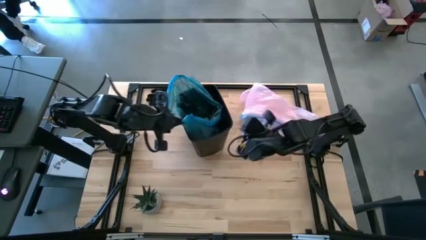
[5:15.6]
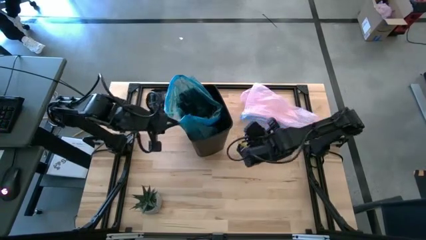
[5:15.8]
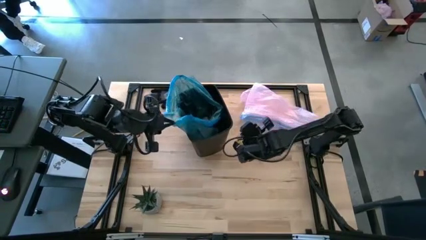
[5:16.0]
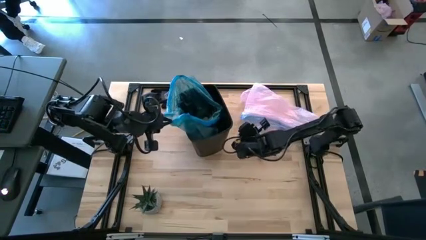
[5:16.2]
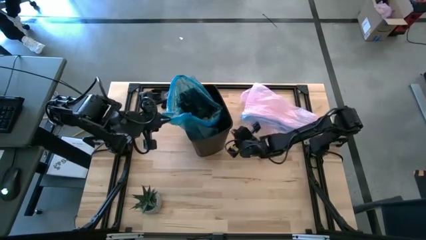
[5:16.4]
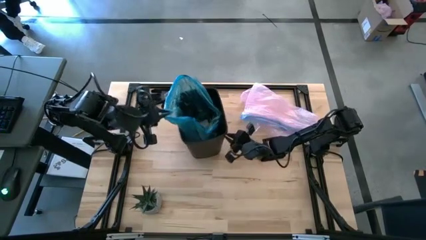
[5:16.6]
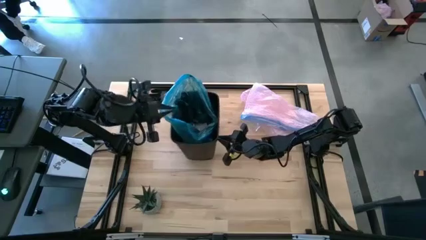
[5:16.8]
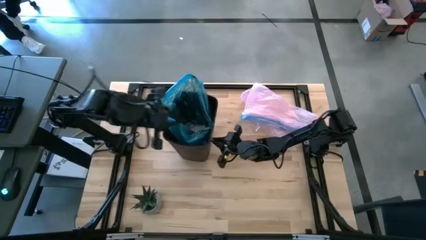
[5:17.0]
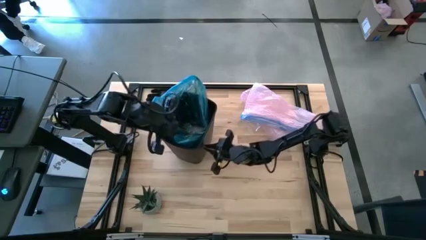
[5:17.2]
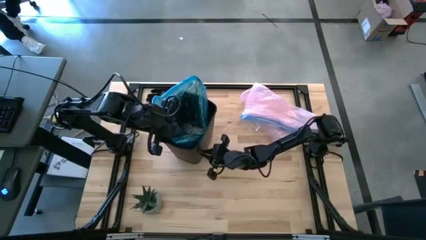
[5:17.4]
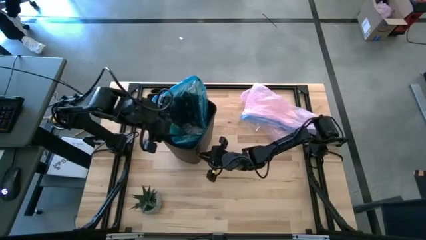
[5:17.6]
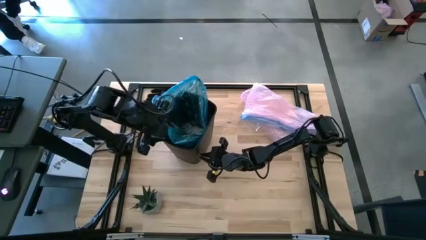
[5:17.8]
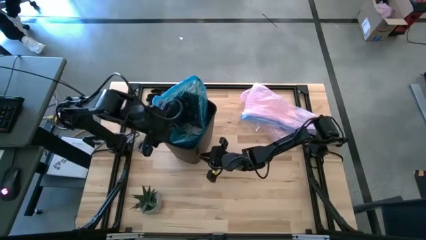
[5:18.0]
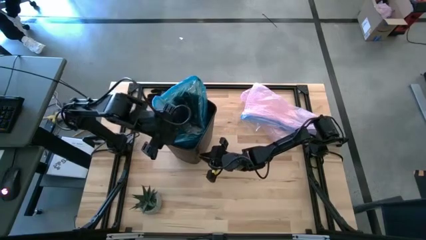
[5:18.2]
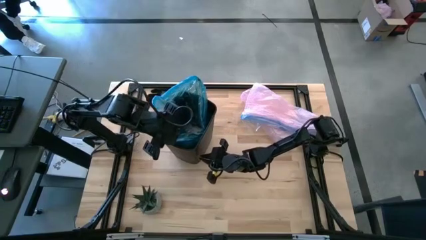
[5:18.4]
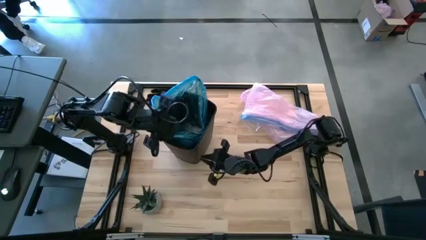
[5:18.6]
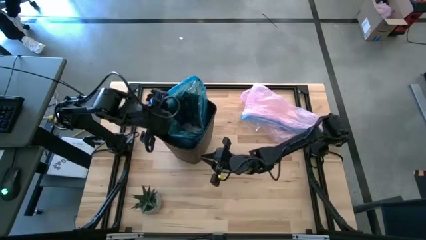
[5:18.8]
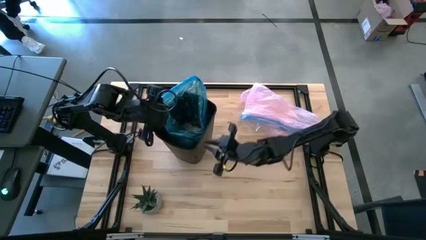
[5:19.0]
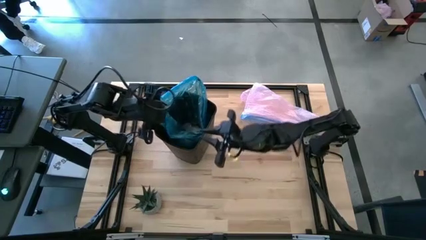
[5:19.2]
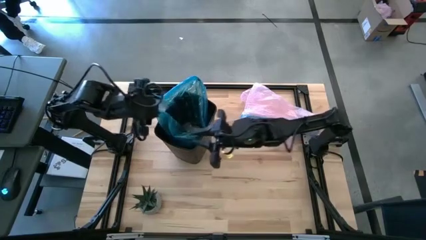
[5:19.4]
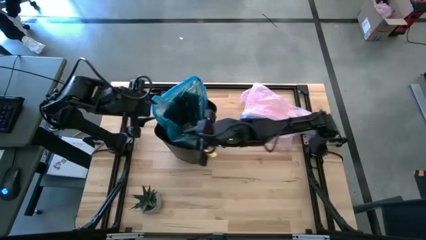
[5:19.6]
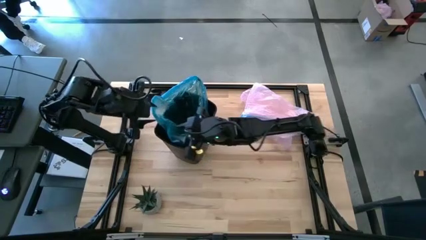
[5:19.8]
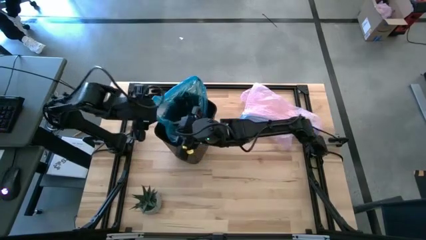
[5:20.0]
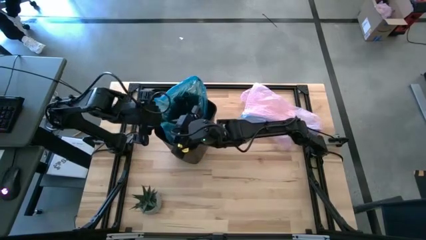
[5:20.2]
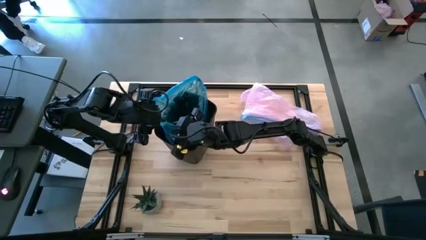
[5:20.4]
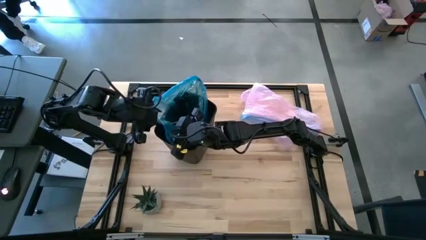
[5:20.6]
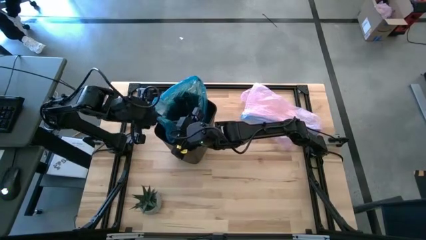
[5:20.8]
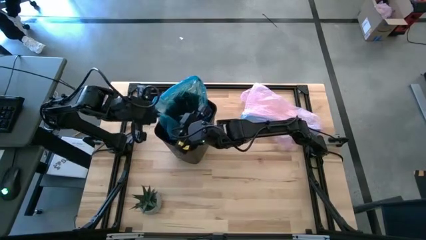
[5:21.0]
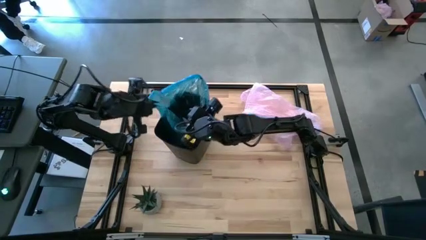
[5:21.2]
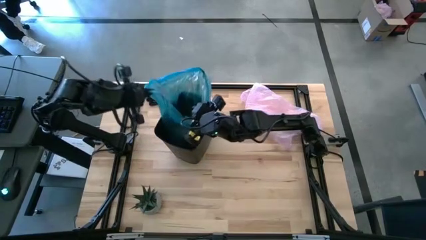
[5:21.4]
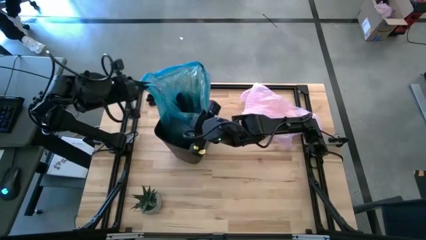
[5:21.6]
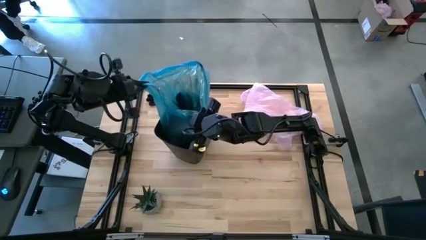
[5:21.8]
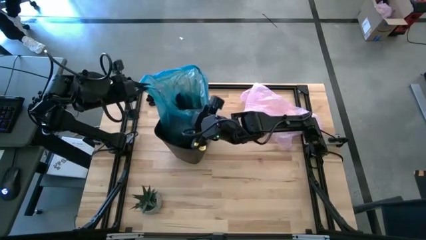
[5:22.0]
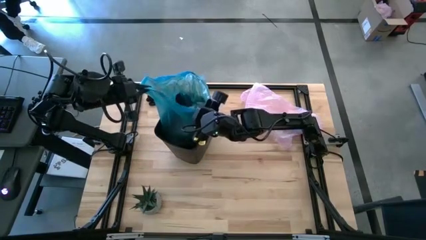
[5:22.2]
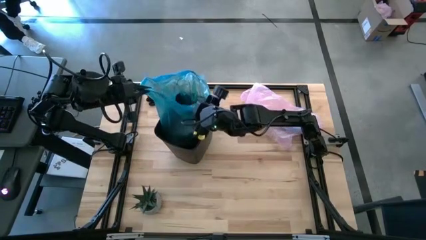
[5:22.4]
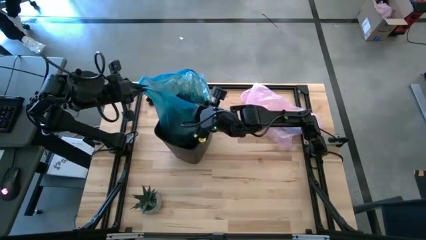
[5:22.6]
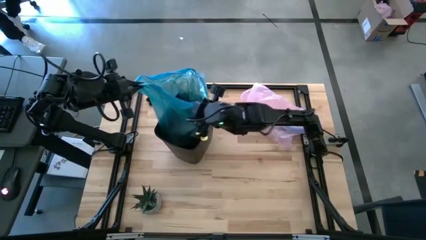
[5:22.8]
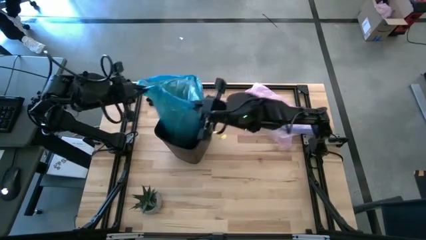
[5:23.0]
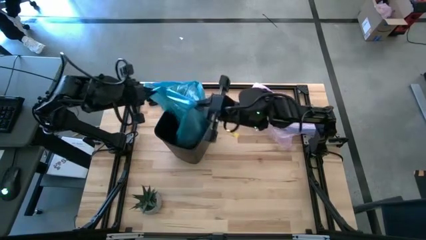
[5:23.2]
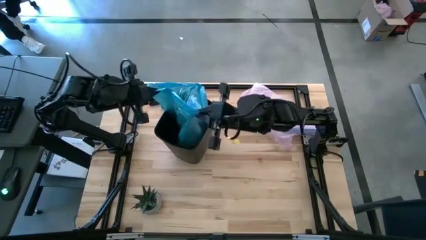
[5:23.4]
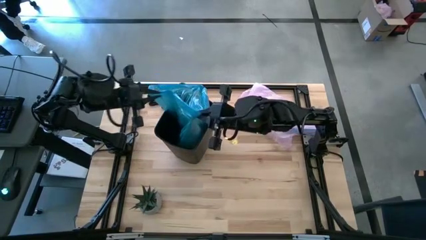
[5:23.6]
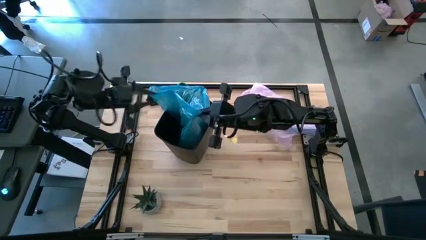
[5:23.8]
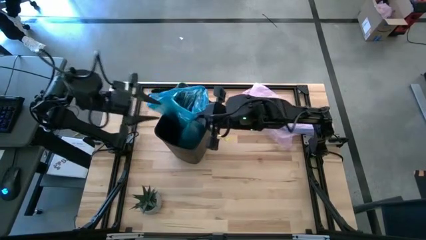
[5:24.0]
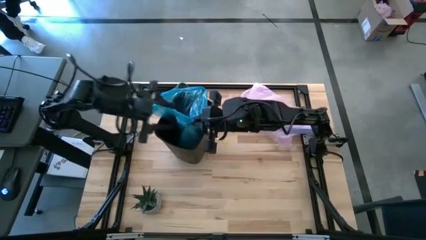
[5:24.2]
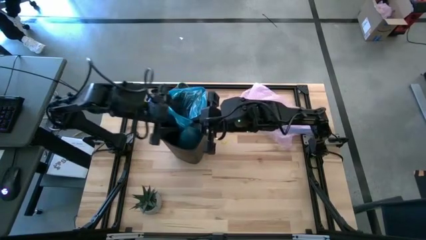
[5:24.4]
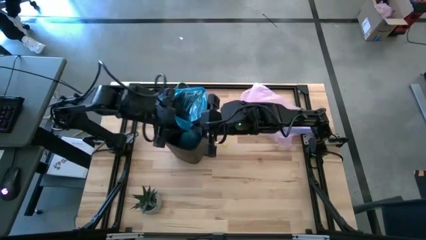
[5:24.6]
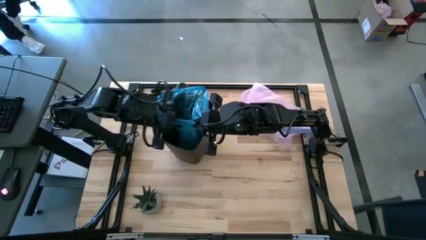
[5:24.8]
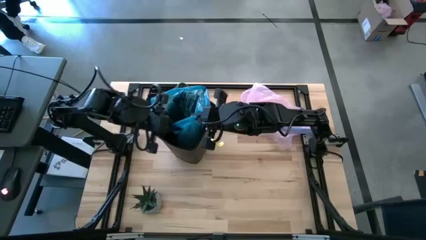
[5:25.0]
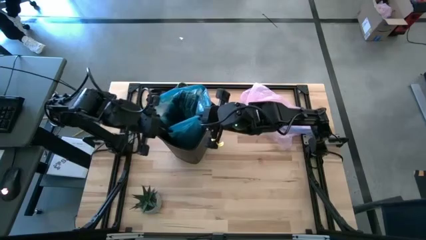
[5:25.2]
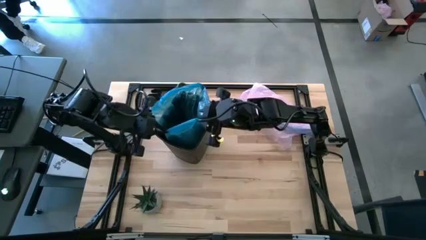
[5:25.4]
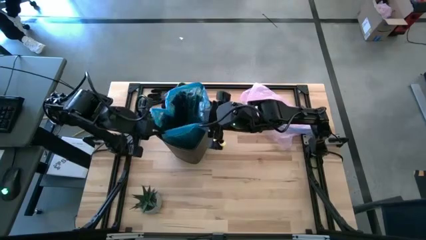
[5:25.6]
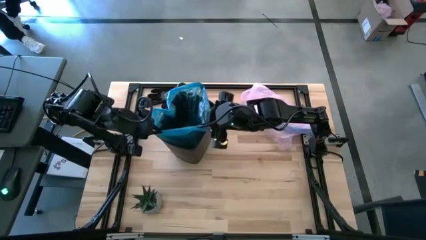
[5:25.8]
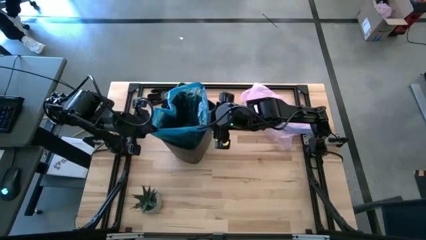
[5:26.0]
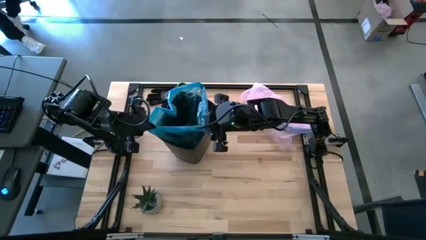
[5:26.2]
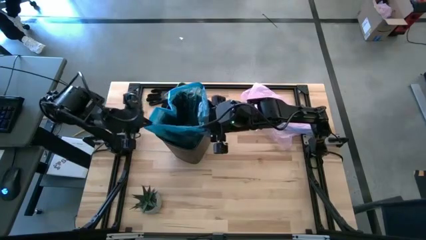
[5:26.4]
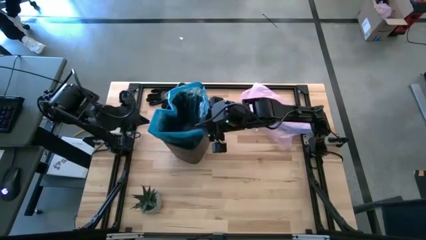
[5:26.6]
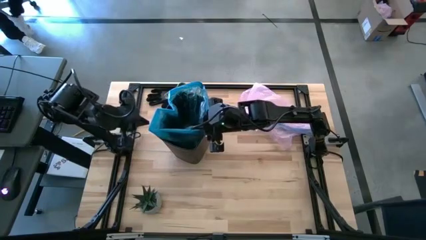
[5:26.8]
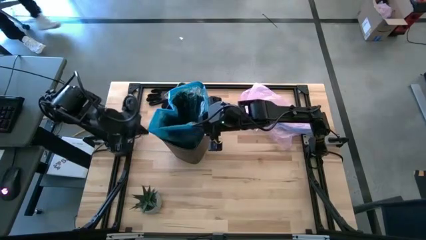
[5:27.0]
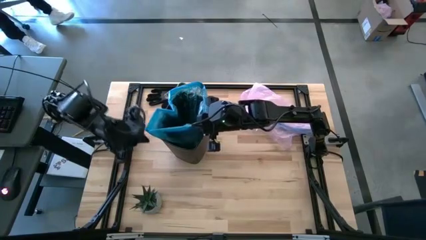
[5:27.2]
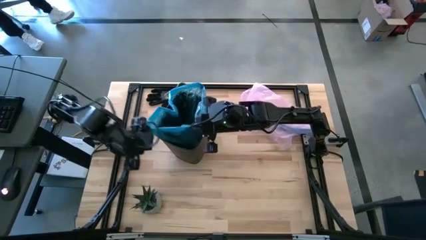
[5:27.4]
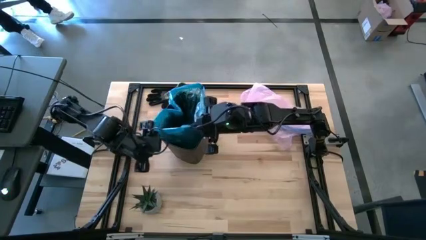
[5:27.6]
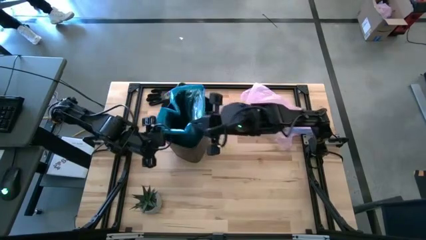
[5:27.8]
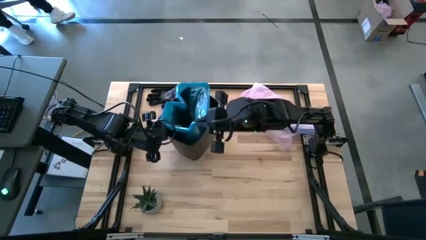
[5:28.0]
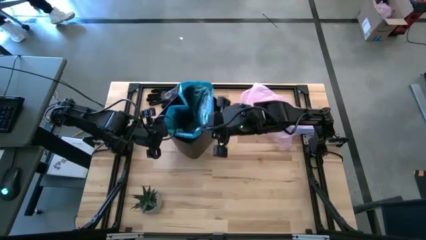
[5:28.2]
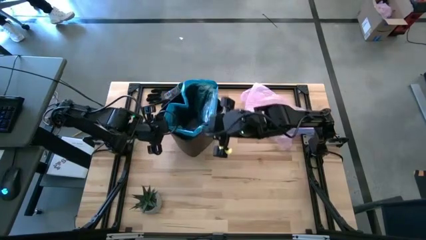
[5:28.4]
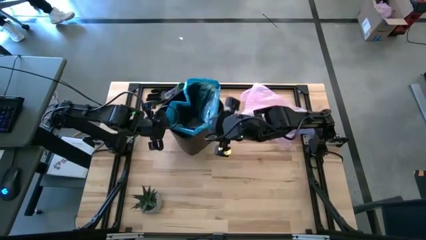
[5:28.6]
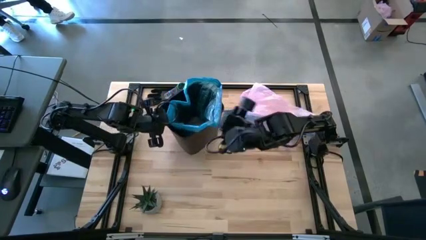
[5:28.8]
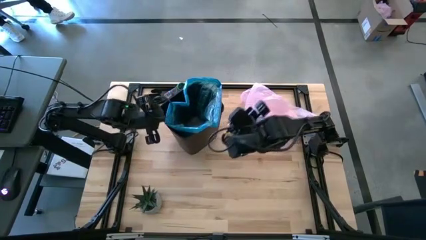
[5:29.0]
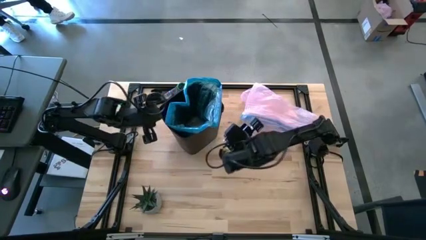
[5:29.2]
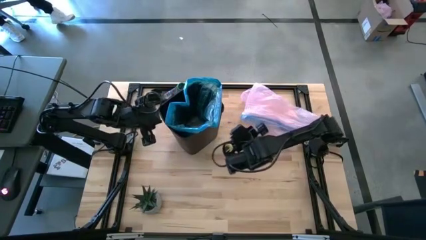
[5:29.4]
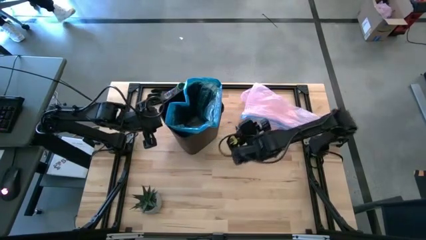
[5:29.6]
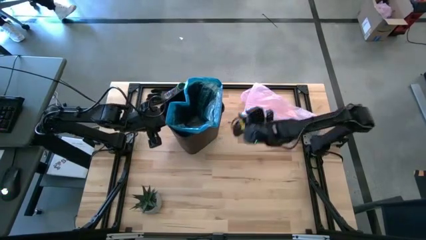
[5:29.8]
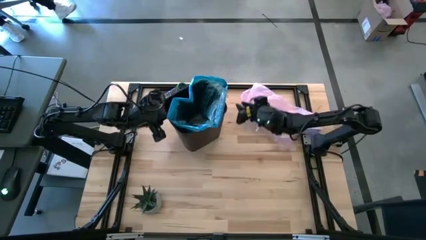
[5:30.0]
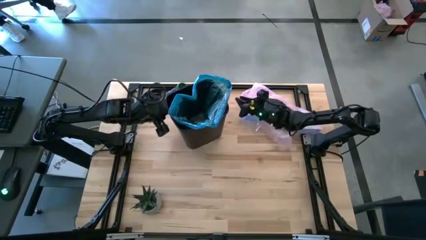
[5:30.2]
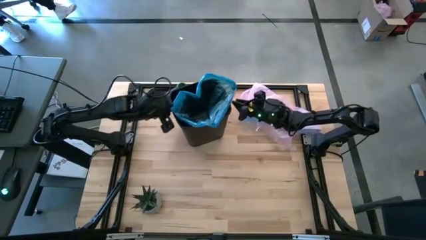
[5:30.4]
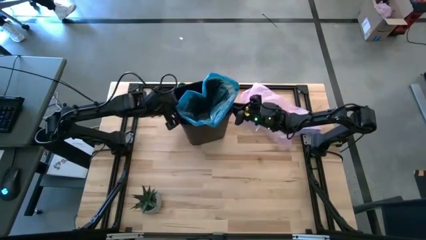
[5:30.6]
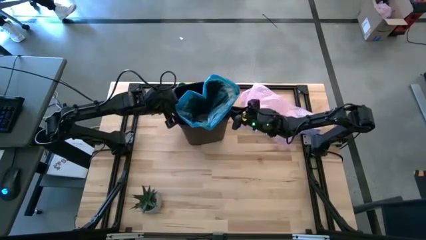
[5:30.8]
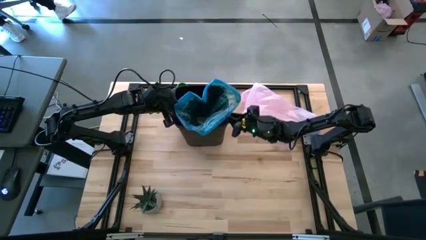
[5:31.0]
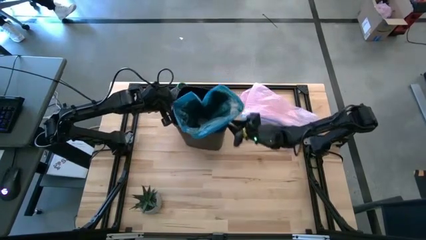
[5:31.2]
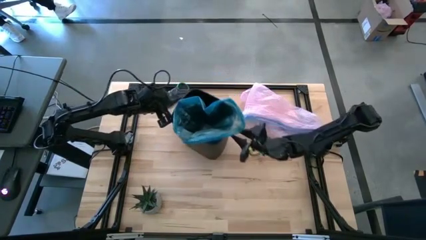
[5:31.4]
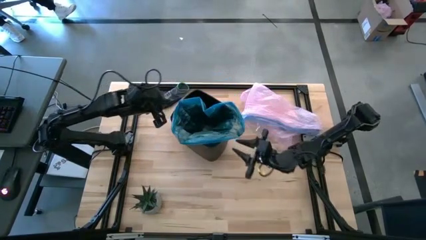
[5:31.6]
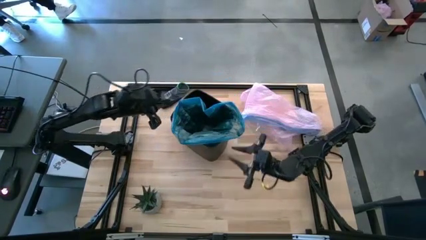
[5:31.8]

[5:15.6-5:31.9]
Task: place trash/remove bag and relplace
Remove the blue trash bag from the trash bin
